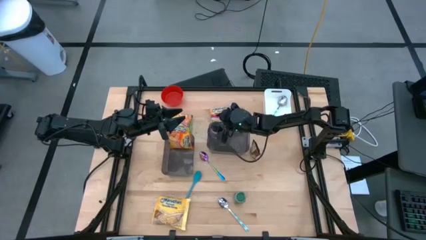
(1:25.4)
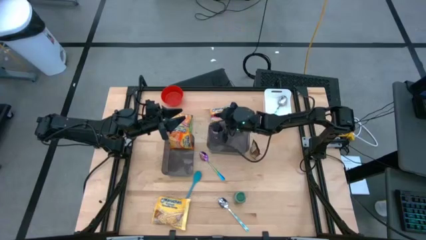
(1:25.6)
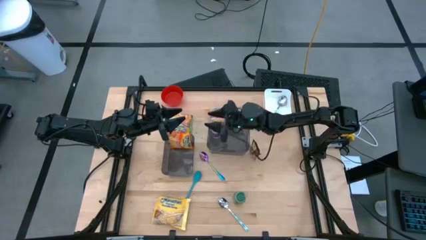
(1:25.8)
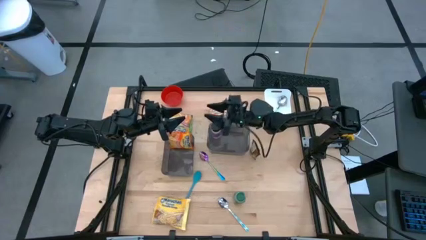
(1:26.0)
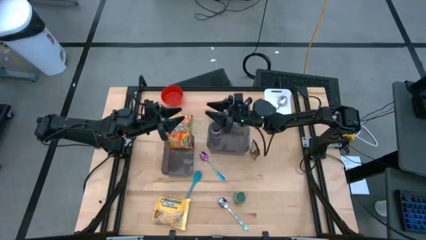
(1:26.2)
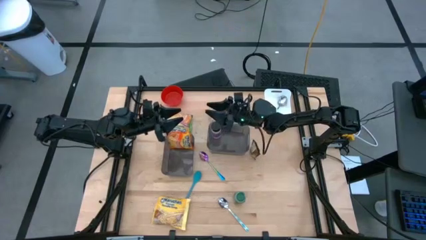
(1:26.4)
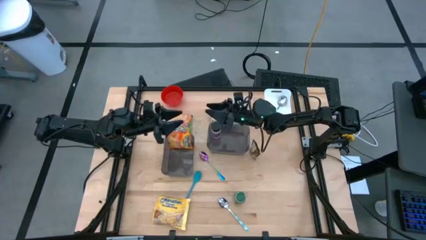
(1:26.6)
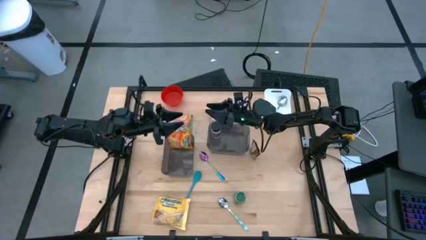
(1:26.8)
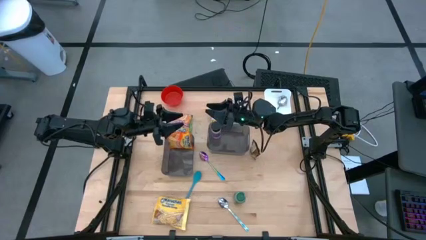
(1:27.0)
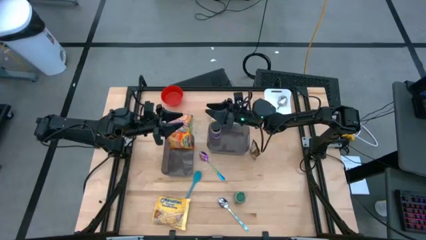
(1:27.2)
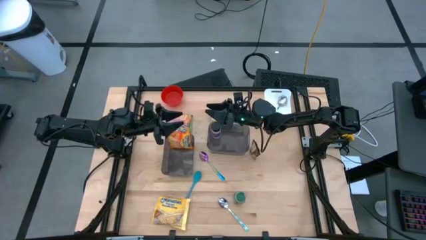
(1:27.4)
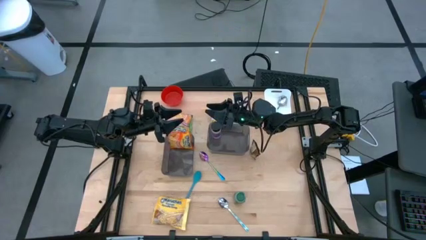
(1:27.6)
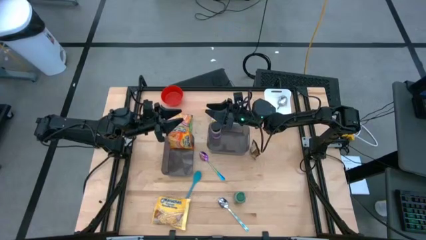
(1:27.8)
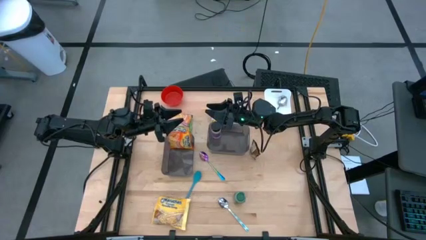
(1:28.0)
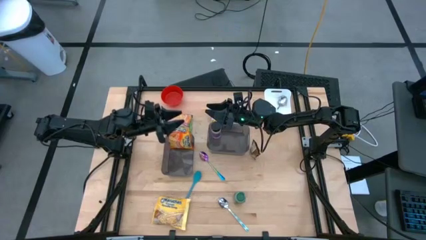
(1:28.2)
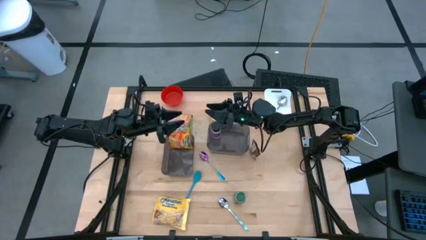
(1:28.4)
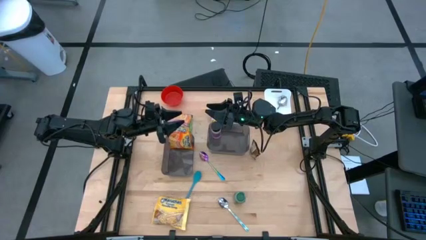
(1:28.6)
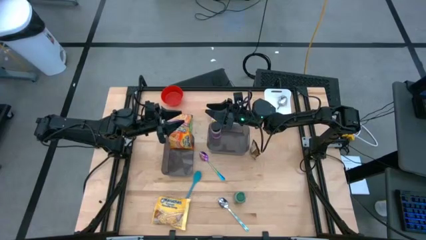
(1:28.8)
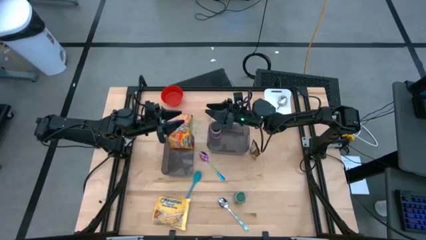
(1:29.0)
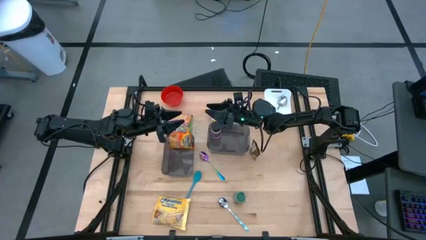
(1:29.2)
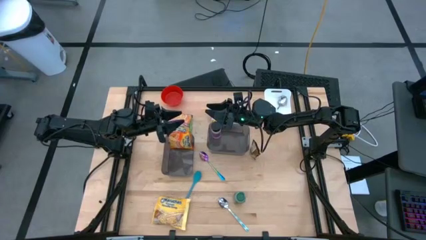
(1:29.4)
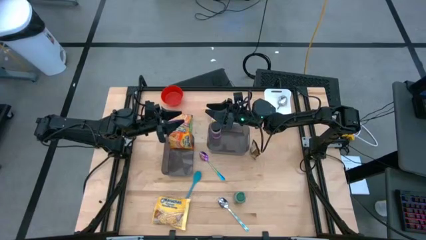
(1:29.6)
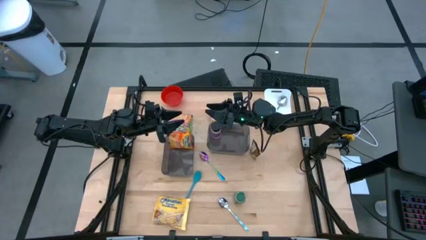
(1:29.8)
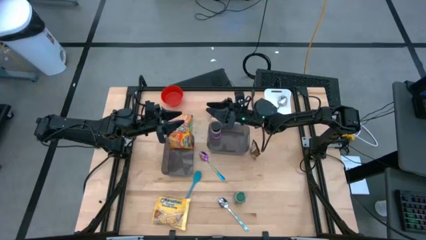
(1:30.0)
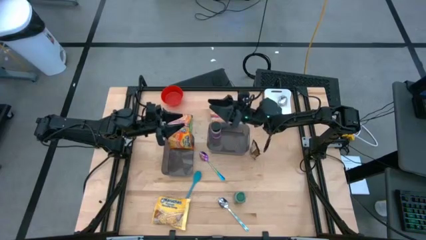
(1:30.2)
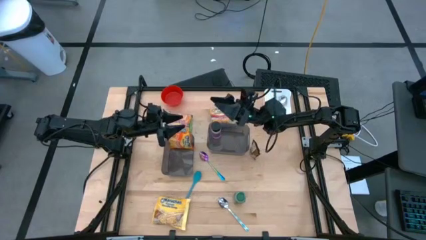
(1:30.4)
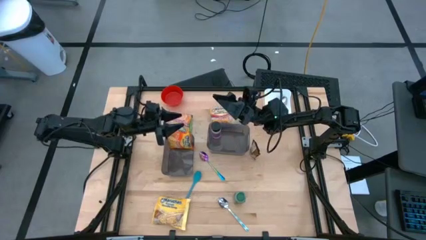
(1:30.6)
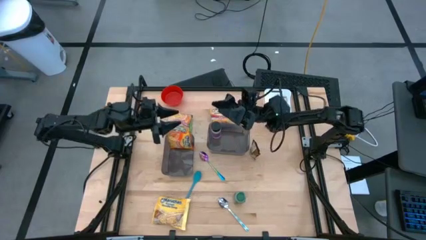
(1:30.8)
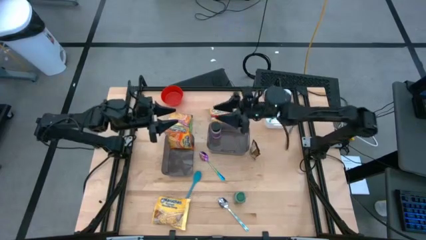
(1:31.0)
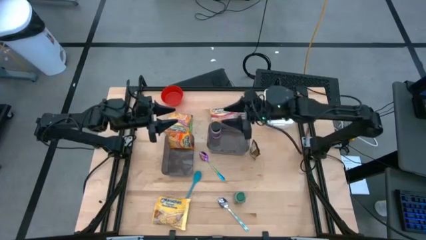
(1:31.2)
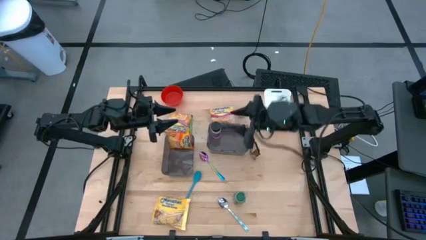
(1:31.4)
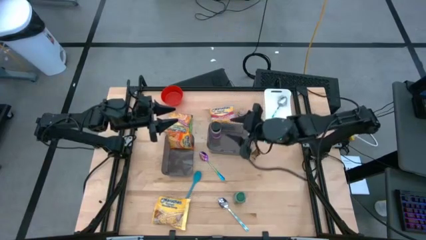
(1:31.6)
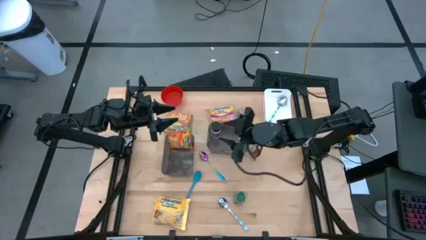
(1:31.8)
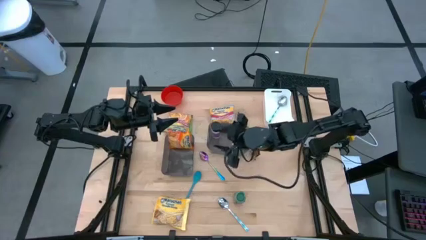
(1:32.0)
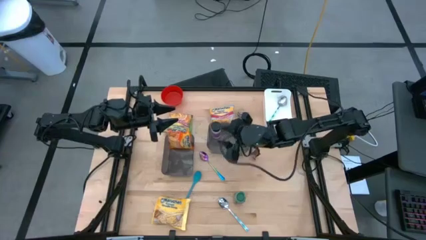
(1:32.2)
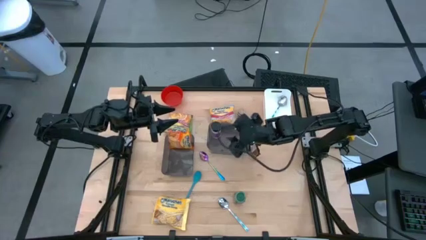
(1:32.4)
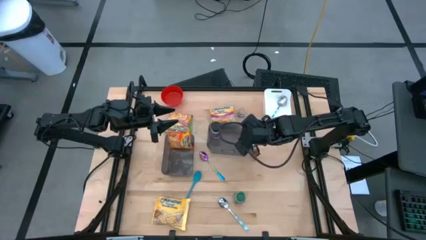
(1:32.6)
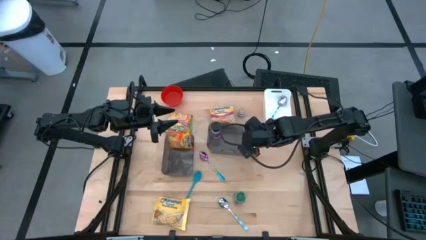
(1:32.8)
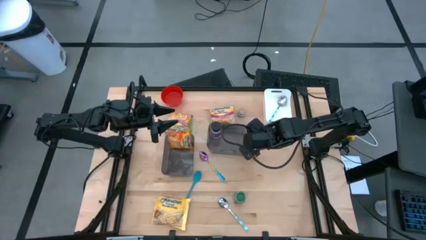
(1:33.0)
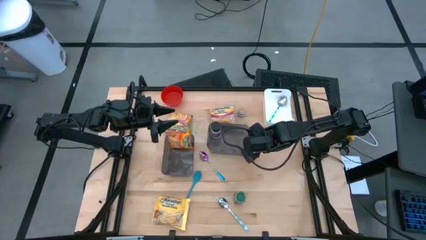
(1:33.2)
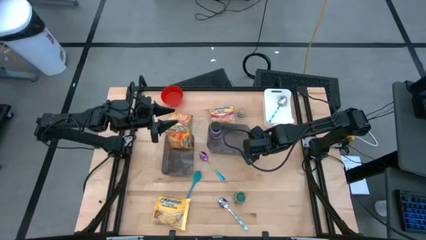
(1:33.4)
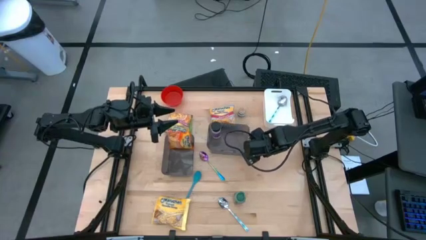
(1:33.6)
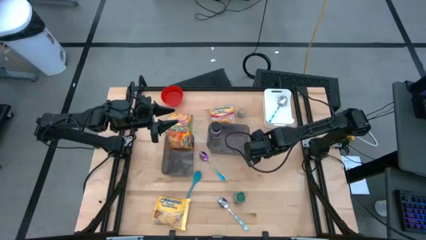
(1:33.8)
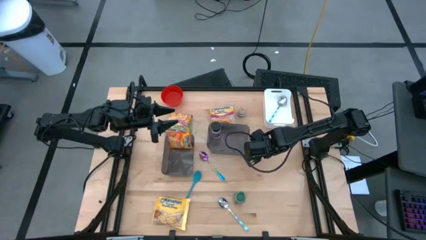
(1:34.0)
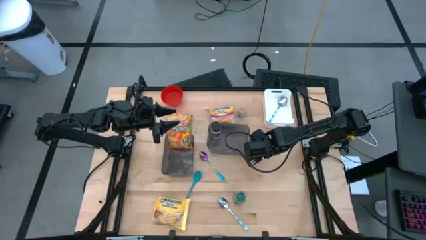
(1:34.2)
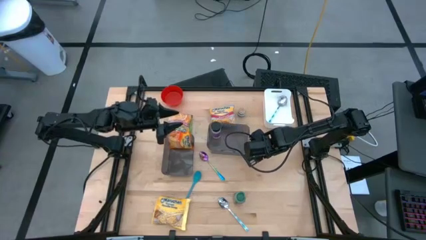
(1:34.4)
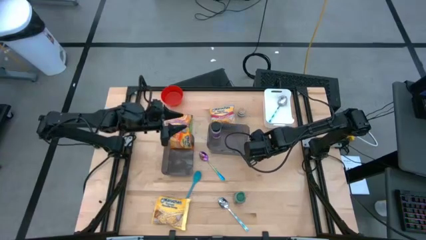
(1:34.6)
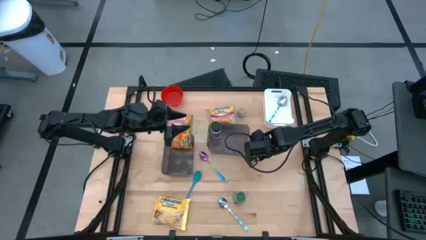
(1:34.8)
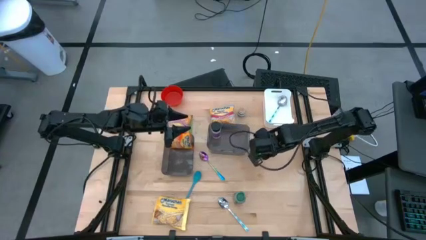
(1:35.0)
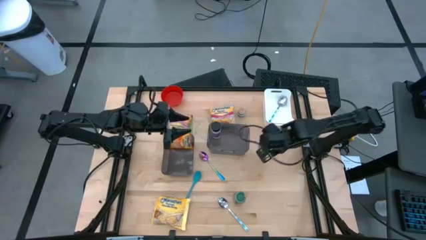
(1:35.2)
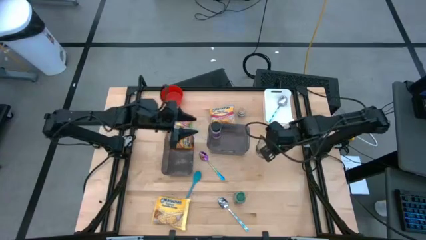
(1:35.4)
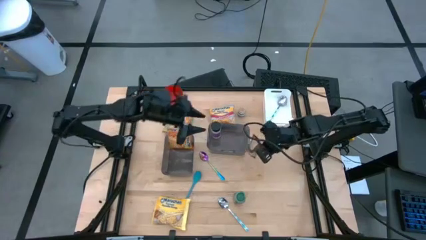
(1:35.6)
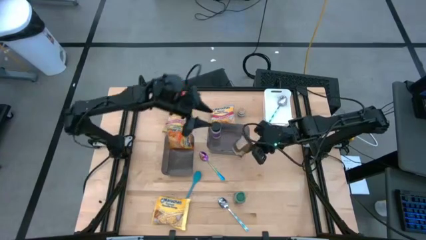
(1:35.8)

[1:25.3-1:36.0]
Task: Pick & Place Food Item
Put the orange spice bag into the right black bin

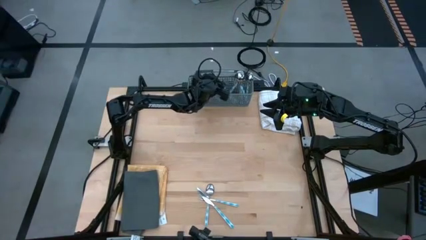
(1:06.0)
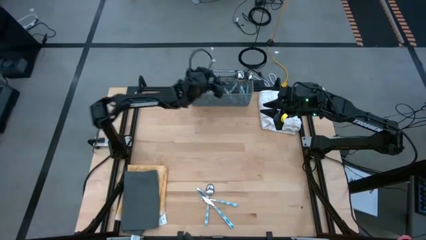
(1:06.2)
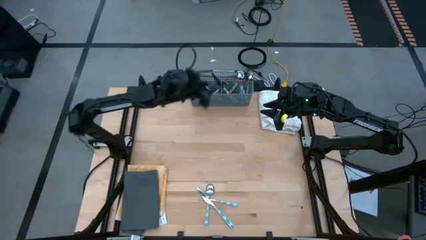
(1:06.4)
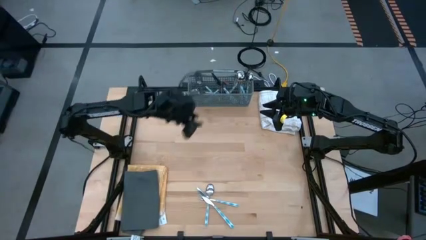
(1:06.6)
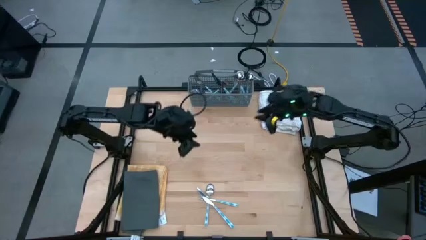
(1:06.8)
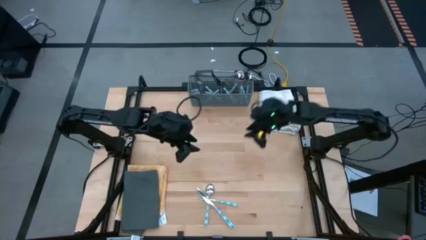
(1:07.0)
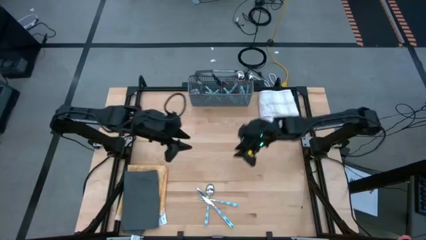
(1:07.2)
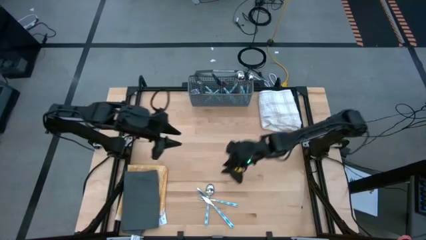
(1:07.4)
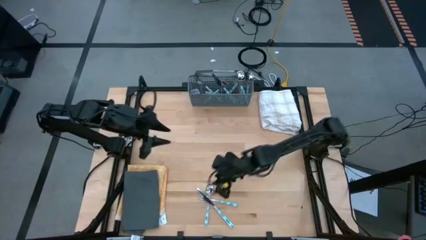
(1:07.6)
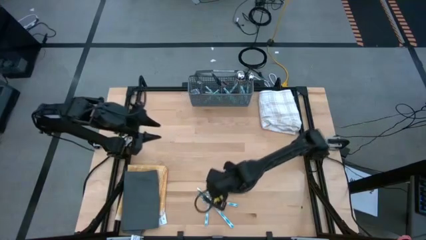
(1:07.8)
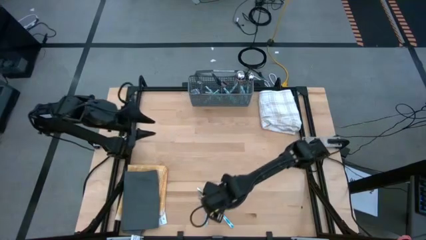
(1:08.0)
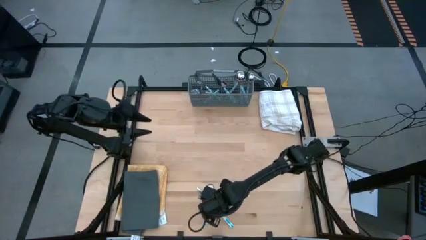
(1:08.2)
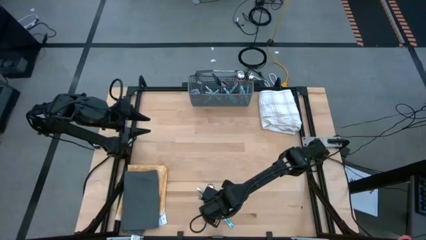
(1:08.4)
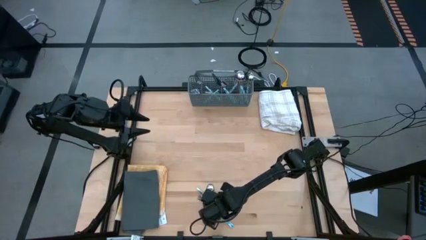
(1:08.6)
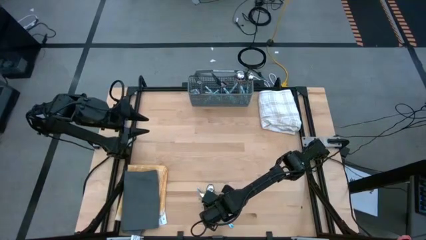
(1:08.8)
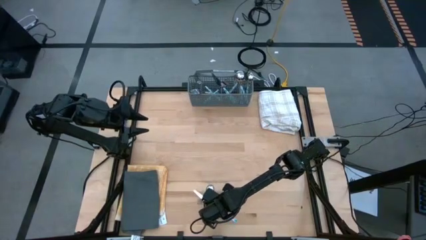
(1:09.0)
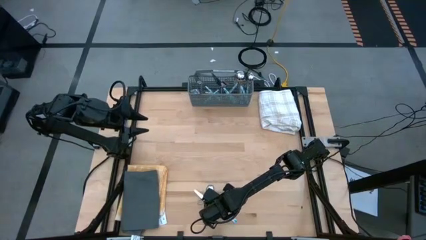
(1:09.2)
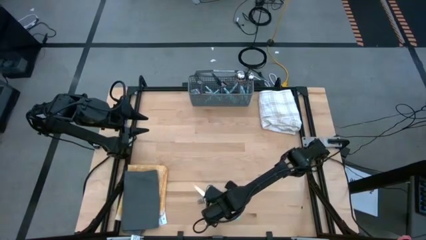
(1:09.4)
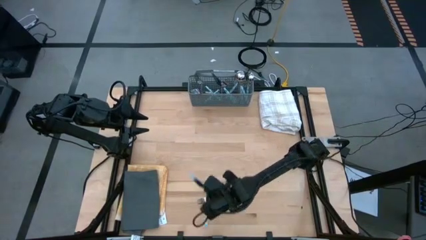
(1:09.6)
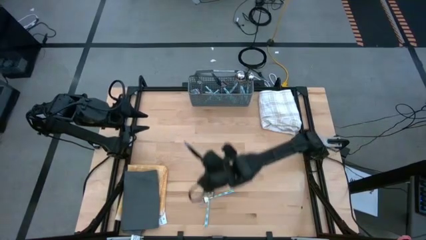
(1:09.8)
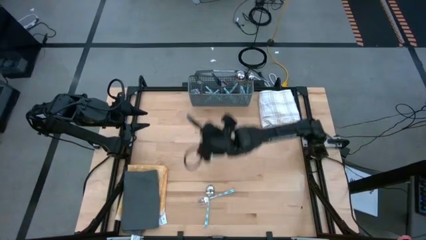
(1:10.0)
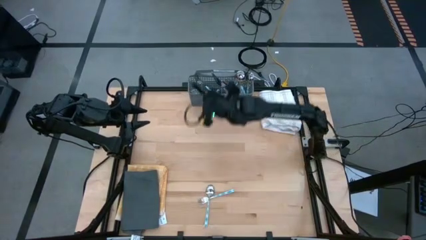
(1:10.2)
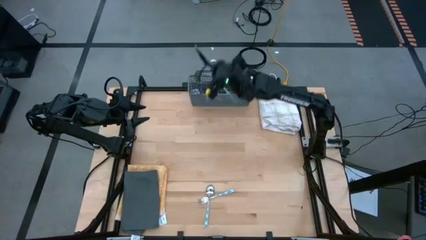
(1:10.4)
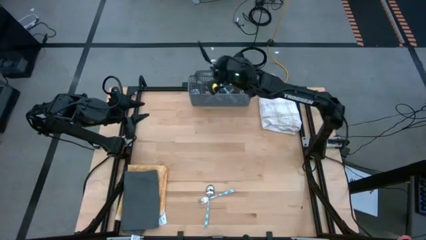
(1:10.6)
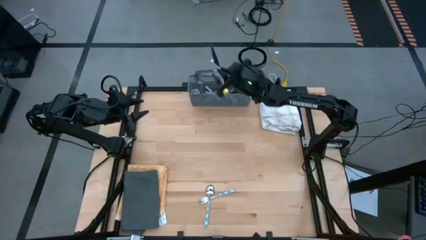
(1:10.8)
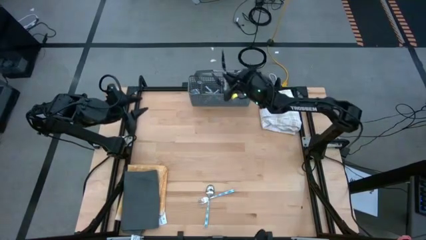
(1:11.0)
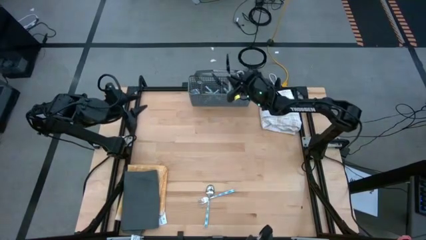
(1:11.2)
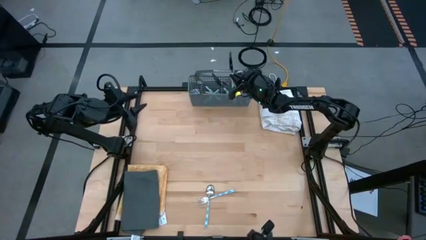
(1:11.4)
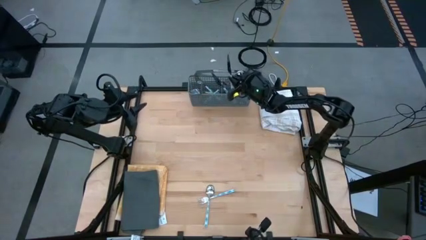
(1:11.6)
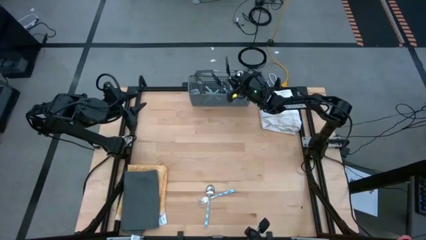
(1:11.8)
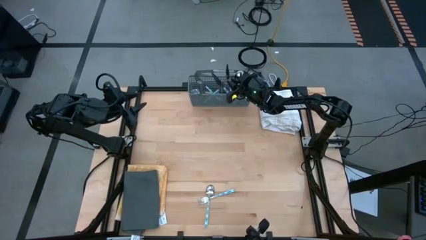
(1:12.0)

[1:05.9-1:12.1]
Task: Sort silverware
Put the blue table knife into the gray silverware rack
